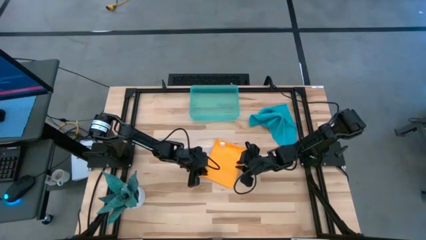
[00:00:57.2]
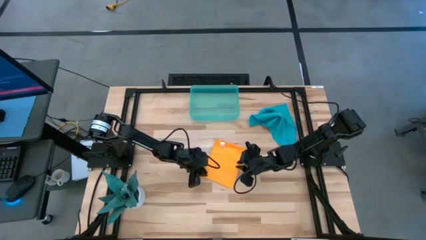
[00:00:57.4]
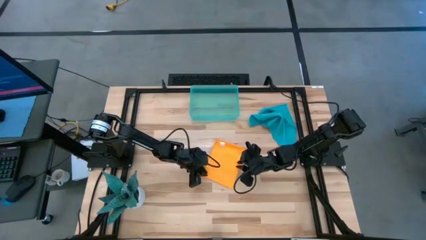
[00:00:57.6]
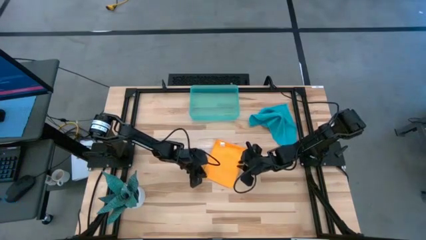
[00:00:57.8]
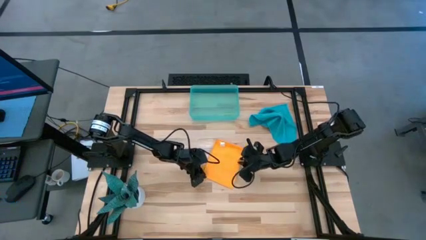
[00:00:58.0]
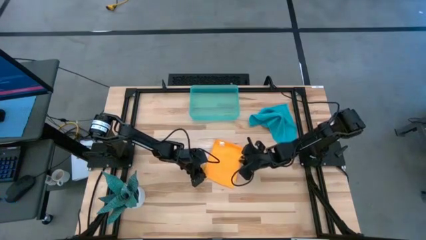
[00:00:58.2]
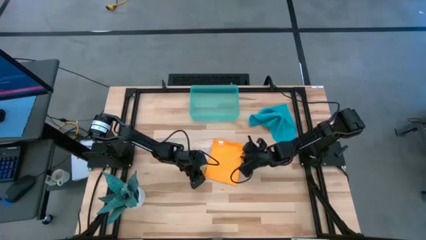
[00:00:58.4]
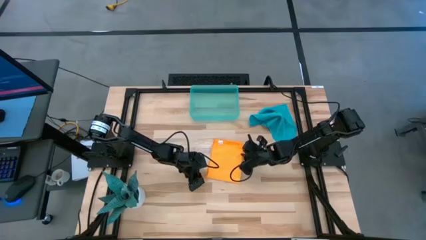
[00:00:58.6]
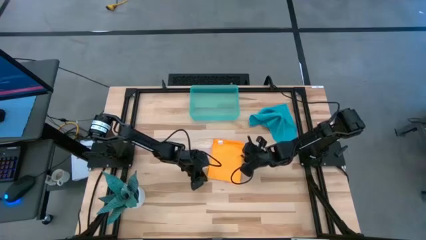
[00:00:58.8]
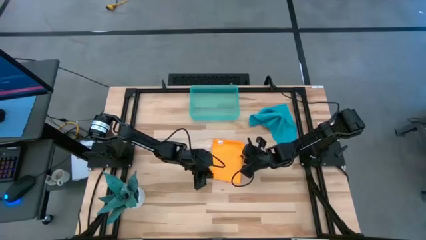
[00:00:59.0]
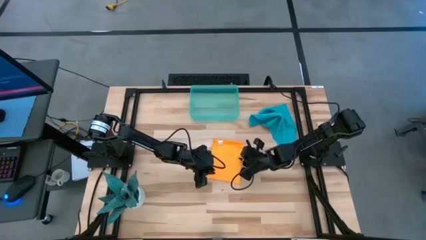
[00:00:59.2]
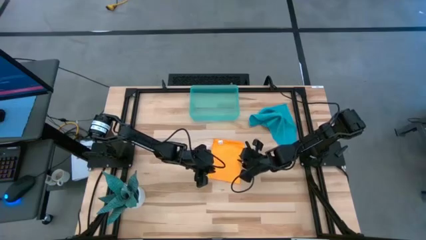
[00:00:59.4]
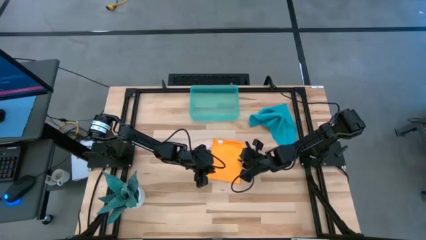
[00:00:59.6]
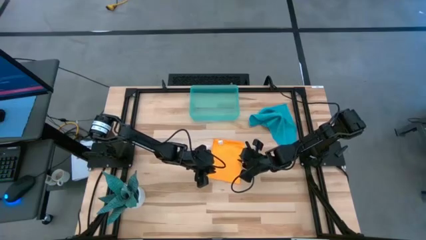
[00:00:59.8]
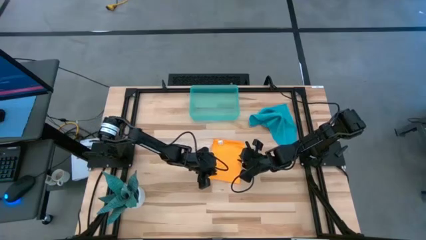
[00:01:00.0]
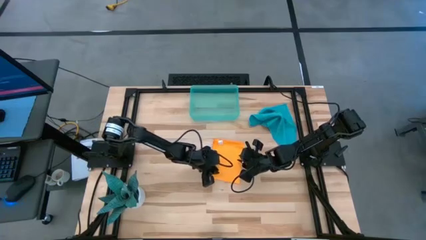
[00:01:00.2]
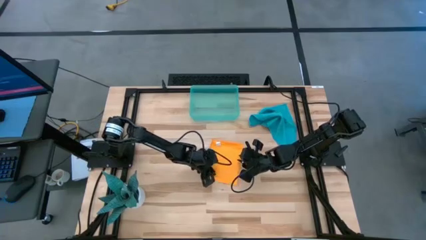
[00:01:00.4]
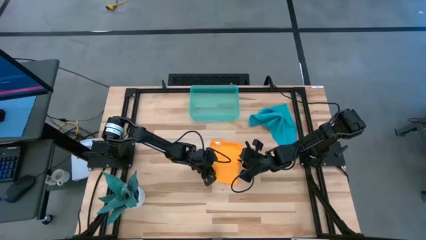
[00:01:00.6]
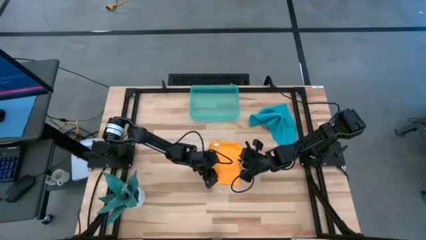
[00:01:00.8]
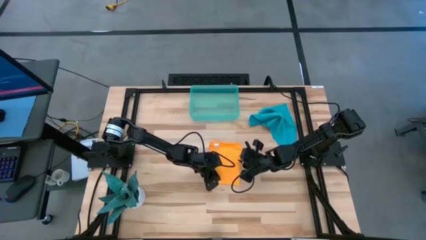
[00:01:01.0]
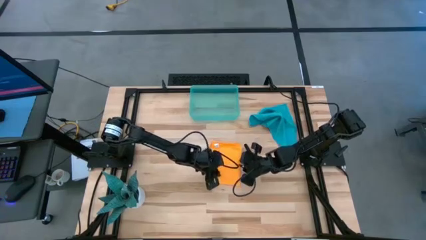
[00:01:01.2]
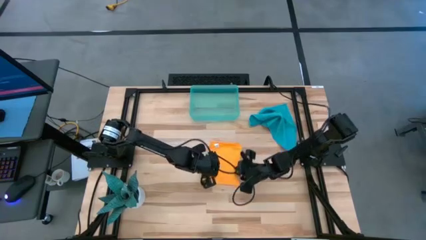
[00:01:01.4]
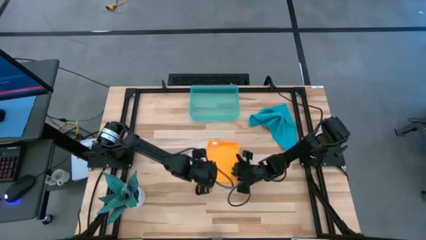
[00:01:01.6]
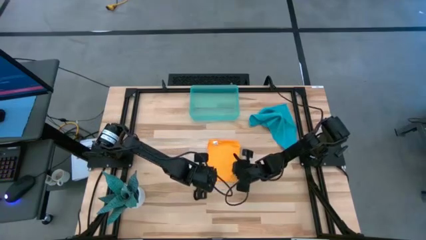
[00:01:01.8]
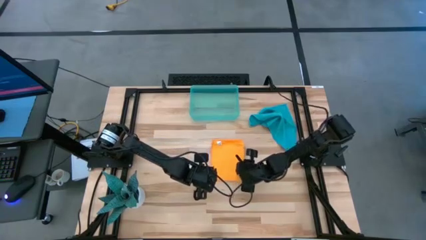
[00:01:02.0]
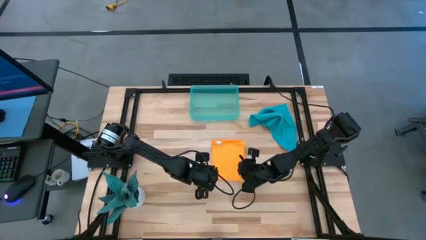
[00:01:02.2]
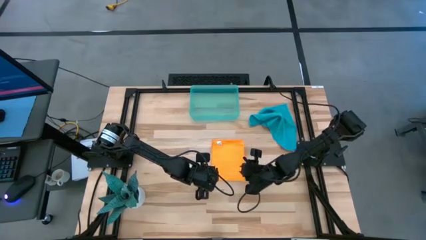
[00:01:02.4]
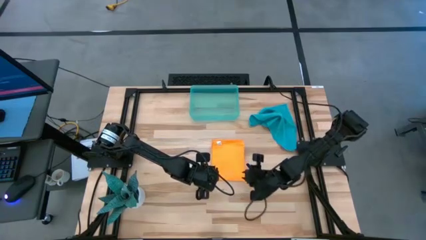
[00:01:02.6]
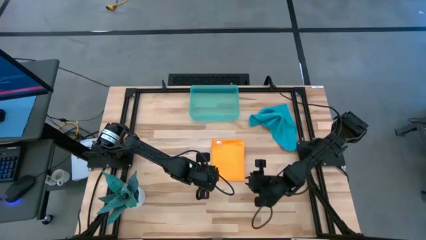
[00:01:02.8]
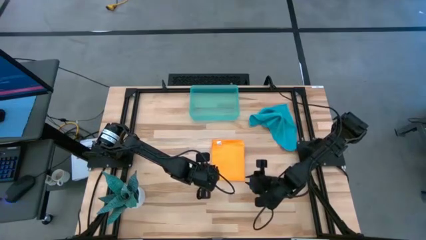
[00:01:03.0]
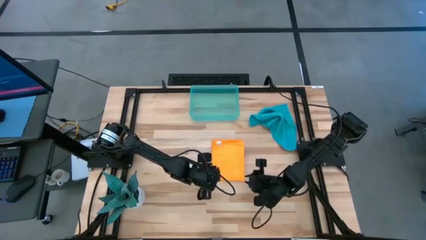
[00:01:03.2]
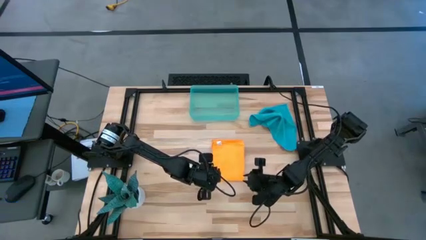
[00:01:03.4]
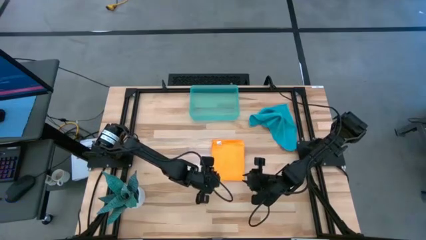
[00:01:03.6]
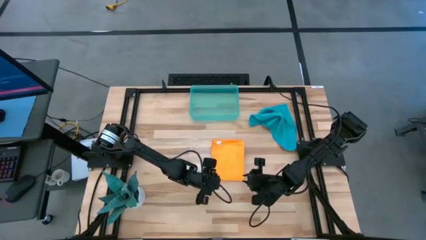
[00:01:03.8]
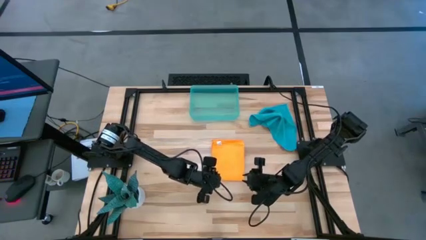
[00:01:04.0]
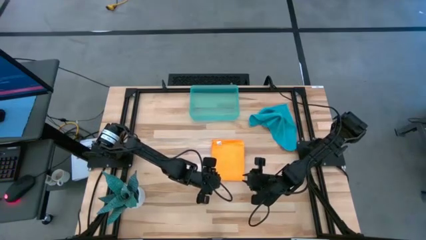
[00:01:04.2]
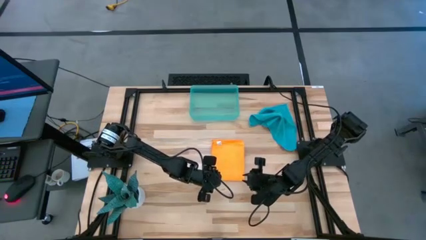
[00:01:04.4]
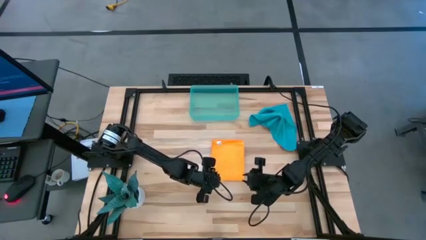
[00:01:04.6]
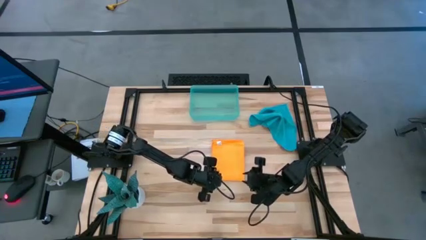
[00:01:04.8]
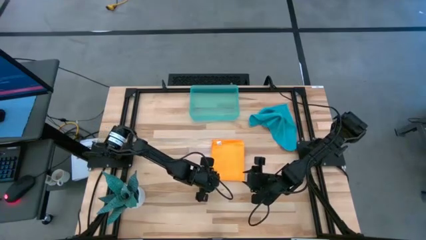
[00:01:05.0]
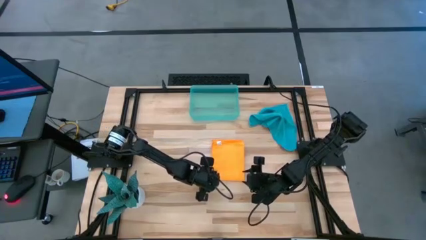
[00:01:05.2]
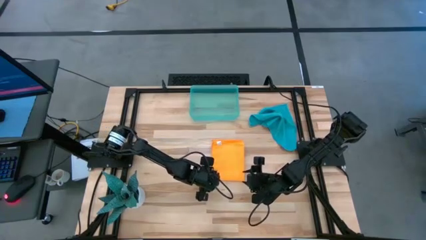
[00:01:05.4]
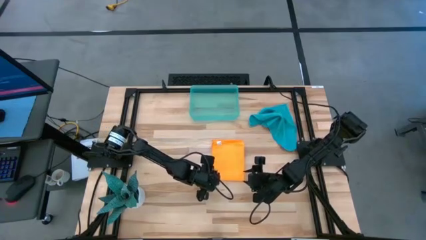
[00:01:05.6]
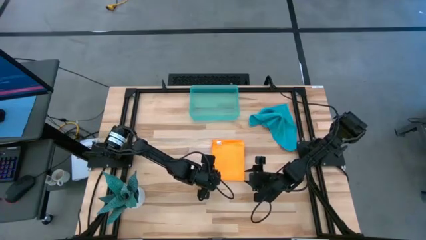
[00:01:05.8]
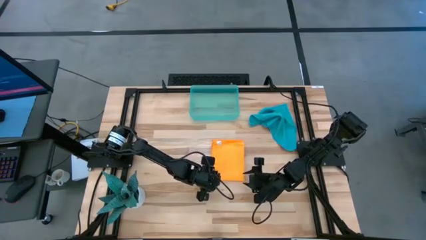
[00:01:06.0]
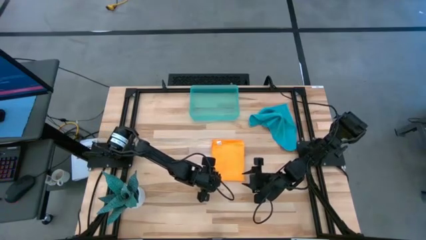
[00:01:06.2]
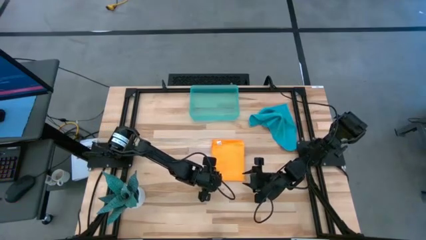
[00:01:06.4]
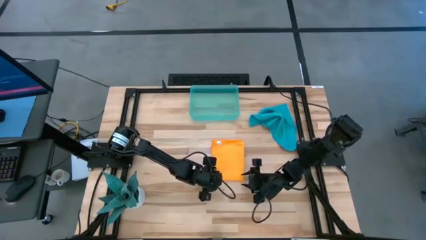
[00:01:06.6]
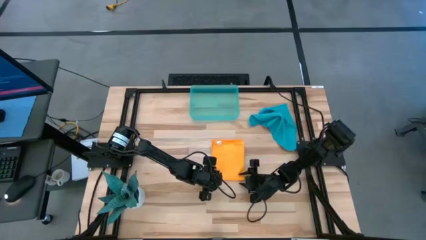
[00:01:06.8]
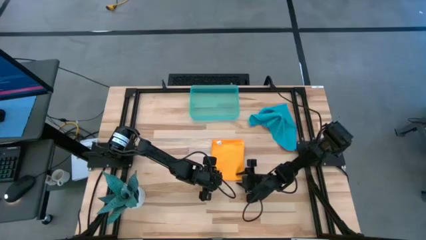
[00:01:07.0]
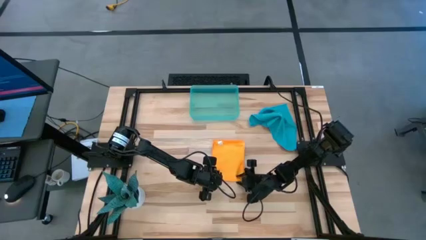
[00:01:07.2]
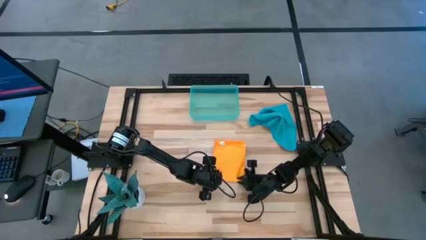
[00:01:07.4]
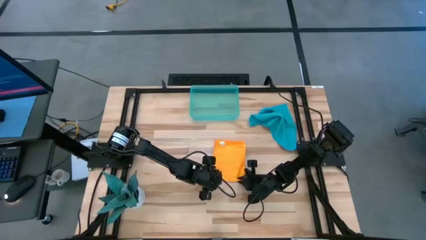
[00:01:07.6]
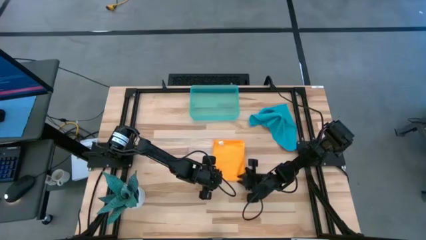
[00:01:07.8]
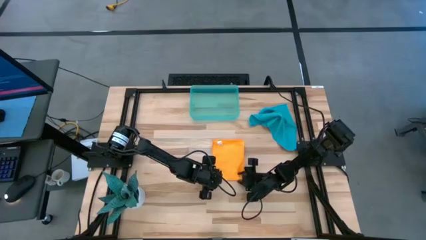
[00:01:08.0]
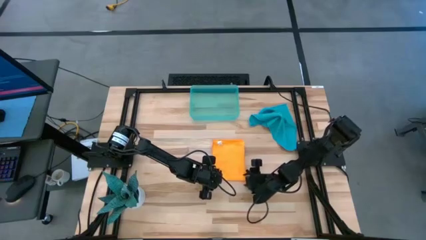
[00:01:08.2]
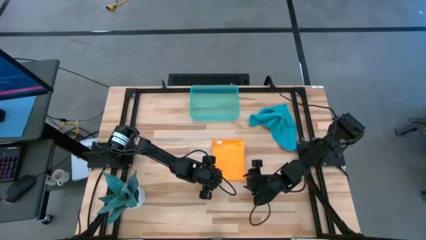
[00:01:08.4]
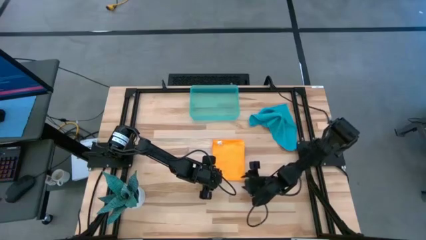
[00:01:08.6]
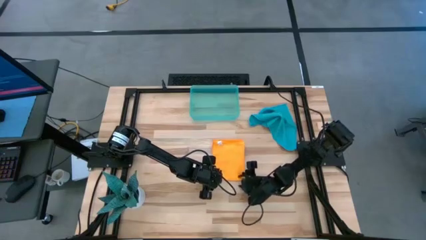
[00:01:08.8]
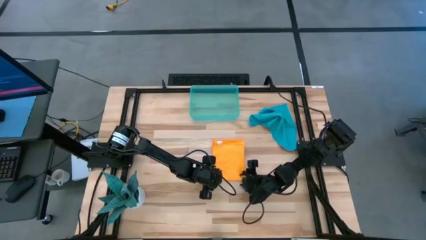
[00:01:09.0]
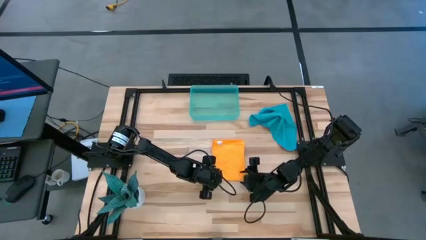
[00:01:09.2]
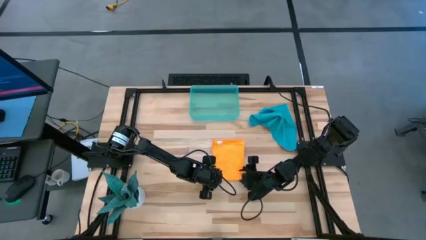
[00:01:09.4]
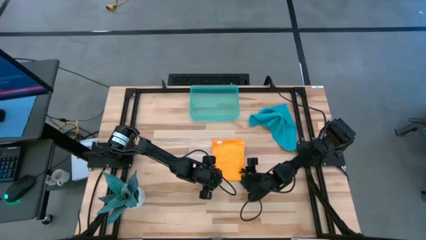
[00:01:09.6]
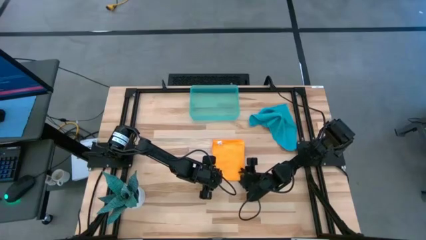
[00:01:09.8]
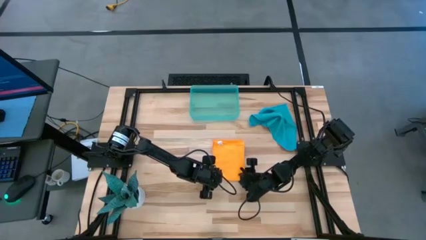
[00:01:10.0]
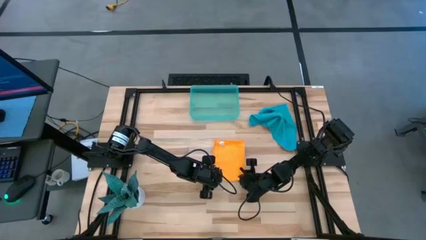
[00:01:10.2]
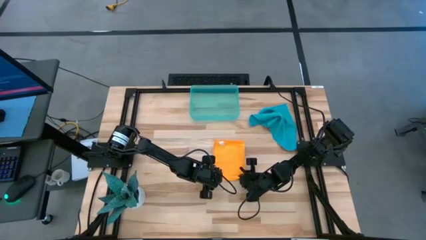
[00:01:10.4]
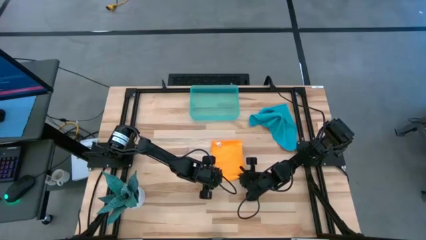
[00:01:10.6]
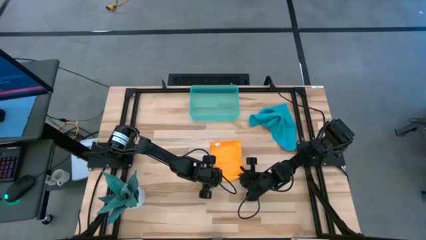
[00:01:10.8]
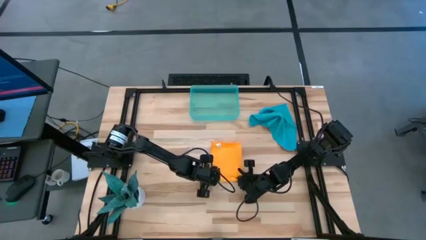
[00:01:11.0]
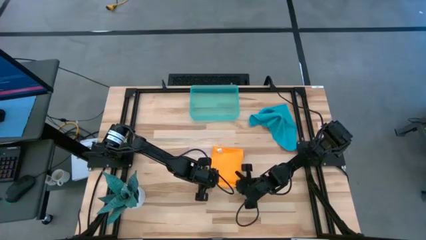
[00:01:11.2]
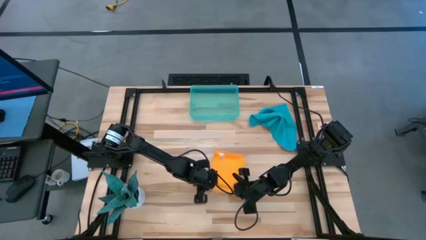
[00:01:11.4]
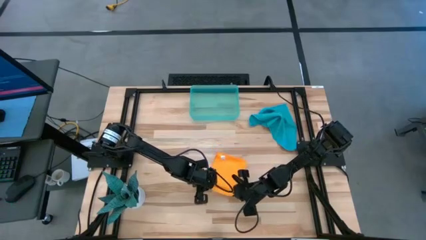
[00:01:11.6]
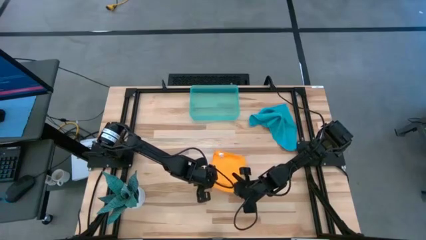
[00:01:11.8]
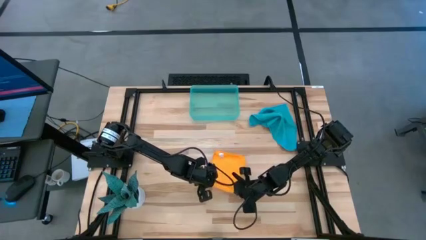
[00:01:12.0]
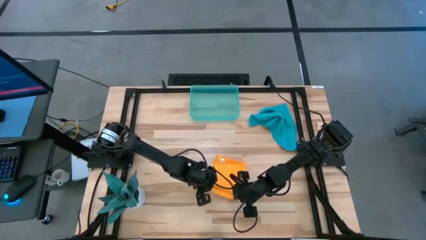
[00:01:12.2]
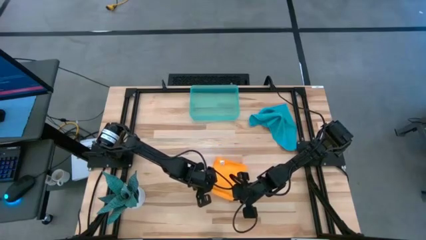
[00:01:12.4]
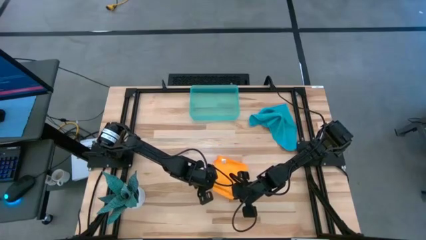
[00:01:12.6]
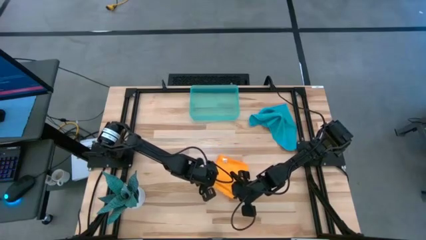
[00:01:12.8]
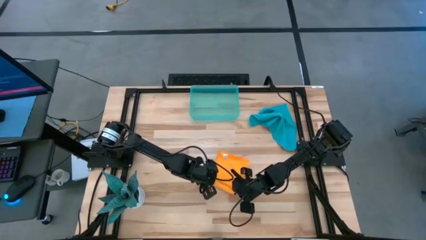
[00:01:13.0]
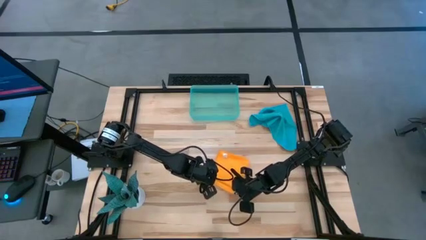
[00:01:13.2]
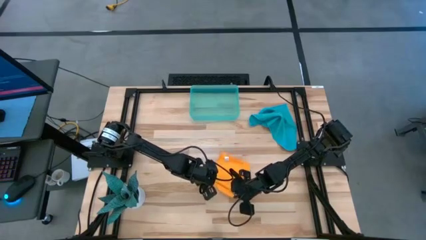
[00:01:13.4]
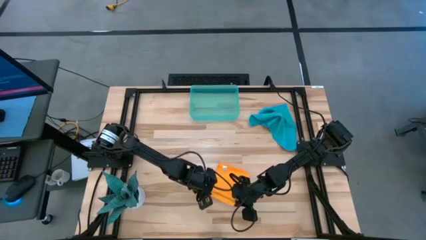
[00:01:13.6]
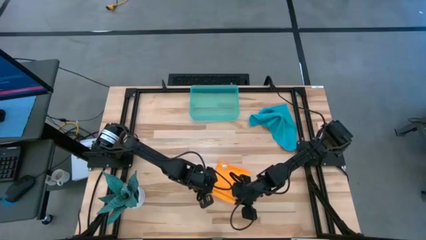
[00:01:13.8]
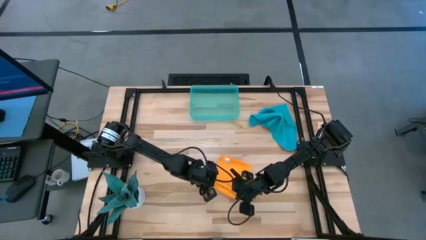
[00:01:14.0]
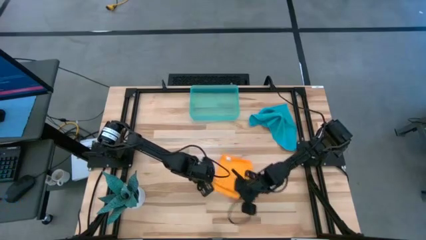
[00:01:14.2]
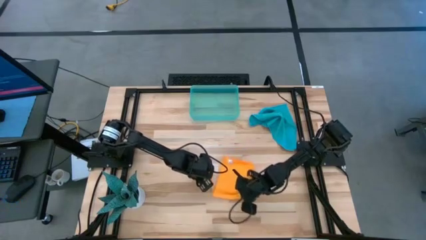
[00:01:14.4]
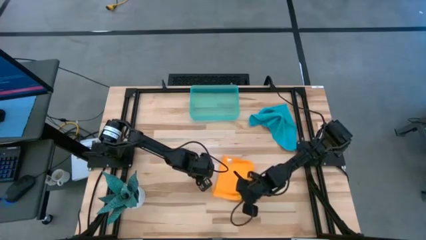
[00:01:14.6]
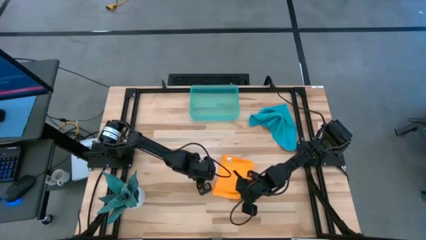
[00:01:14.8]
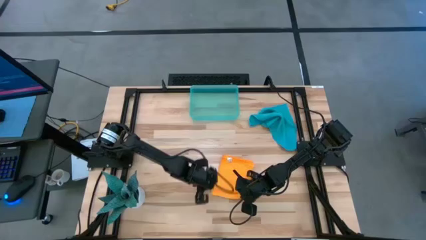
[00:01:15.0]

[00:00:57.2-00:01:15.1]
Task: Roll microfiber towels into tight, uniform cylinder then place into a basket
Roll the yellow microfiber cloth on the table
